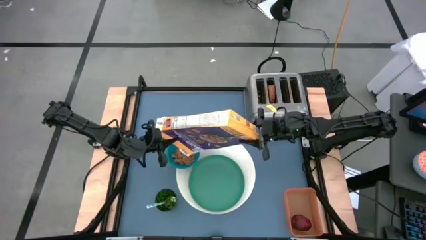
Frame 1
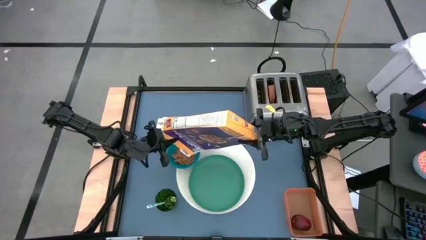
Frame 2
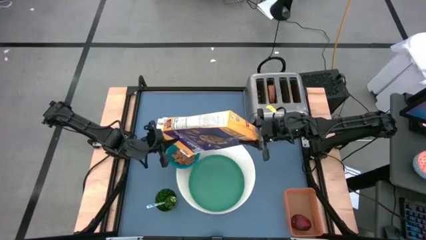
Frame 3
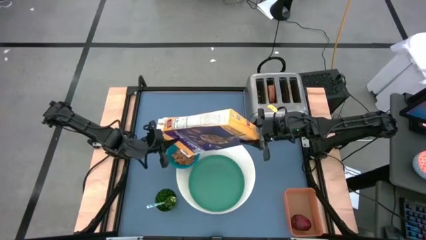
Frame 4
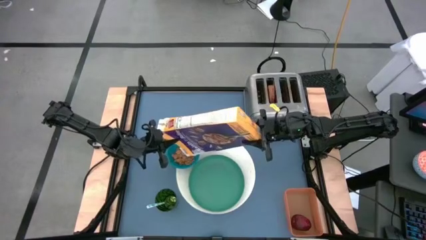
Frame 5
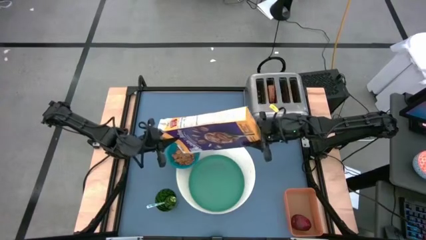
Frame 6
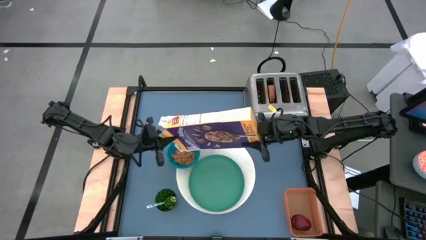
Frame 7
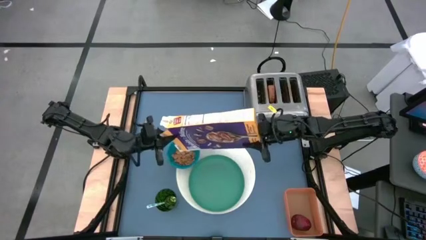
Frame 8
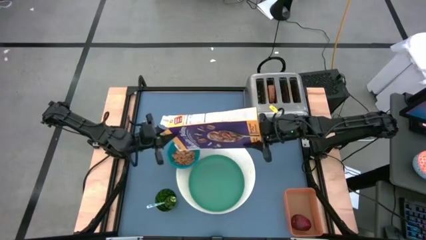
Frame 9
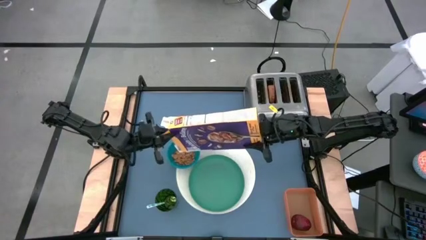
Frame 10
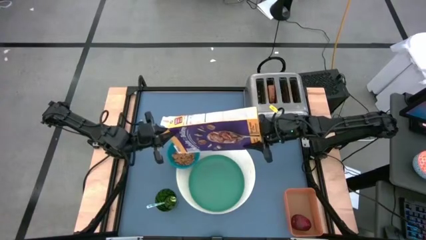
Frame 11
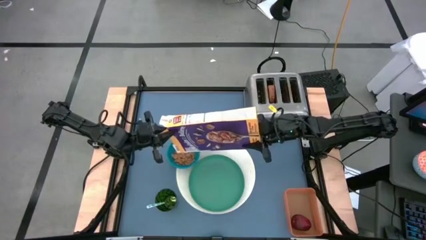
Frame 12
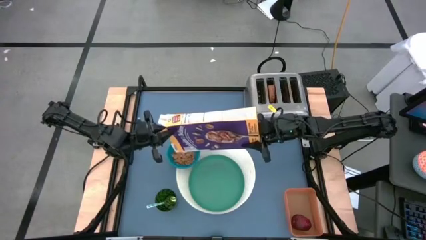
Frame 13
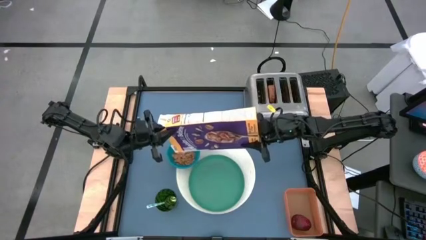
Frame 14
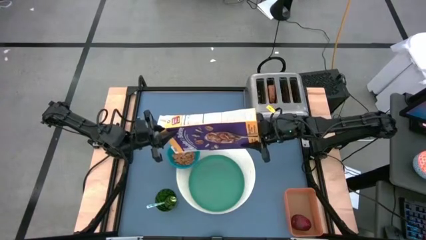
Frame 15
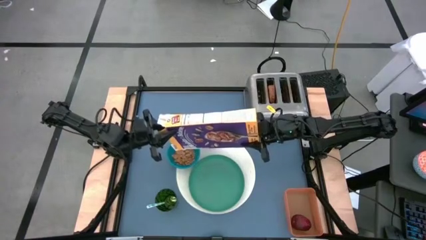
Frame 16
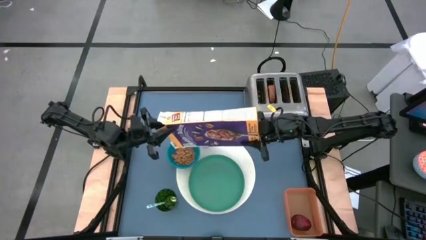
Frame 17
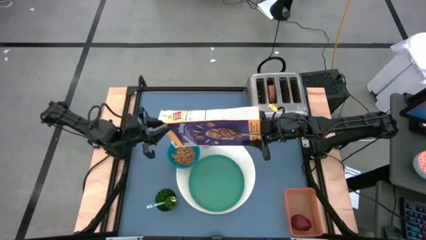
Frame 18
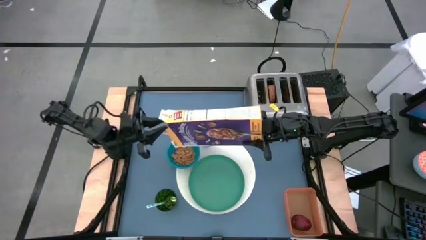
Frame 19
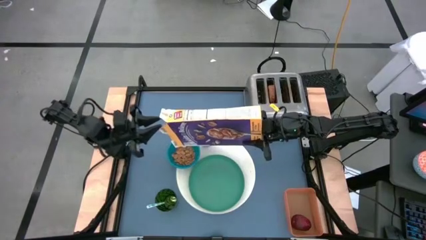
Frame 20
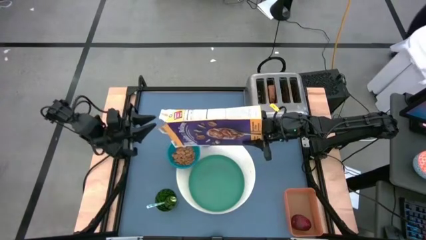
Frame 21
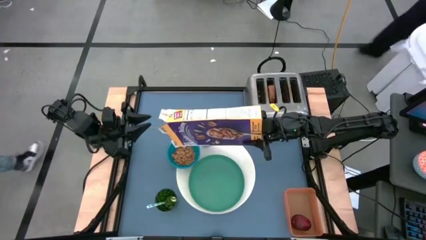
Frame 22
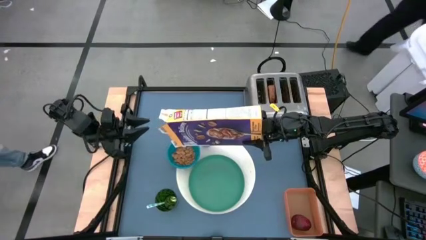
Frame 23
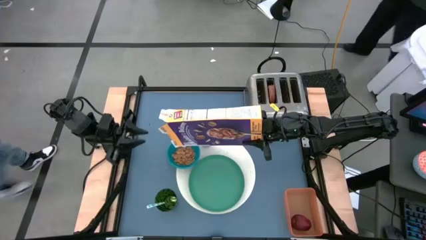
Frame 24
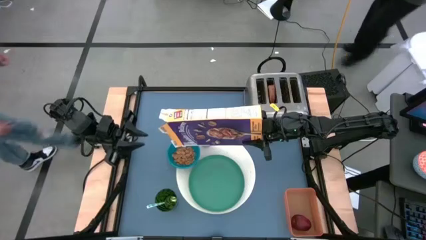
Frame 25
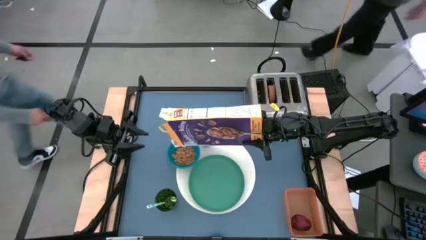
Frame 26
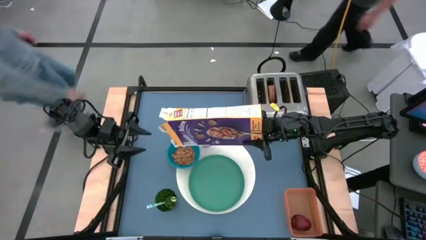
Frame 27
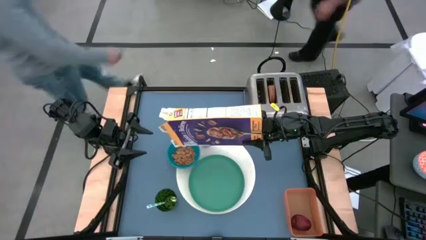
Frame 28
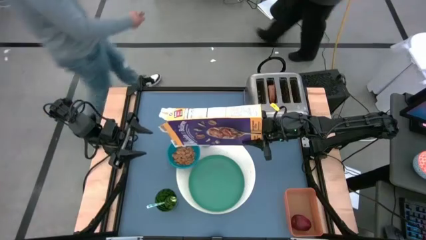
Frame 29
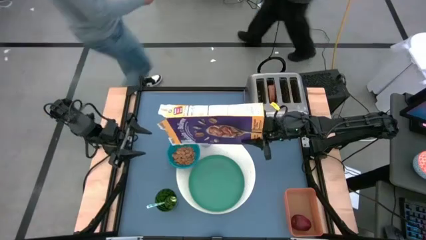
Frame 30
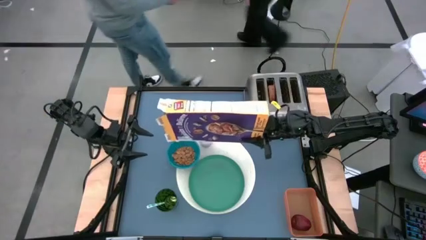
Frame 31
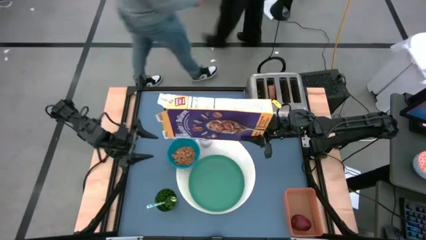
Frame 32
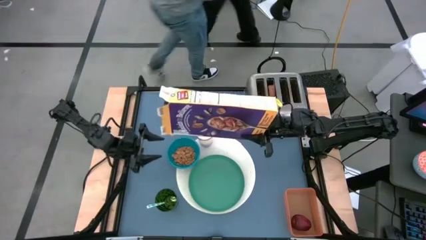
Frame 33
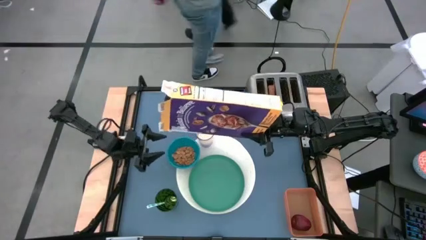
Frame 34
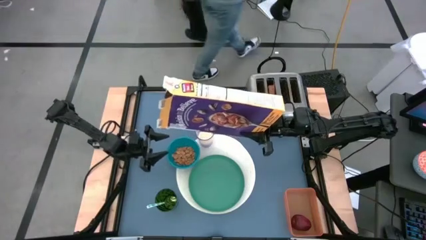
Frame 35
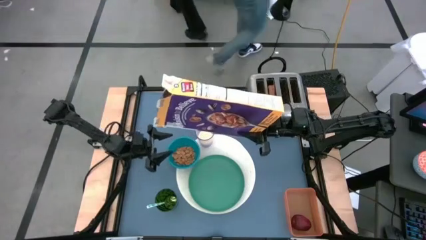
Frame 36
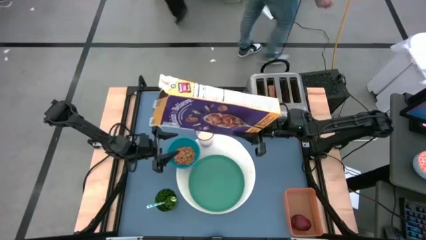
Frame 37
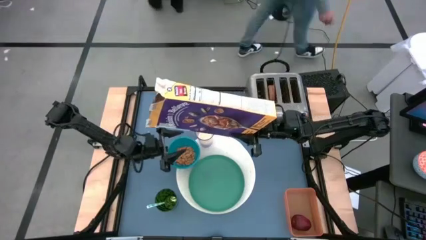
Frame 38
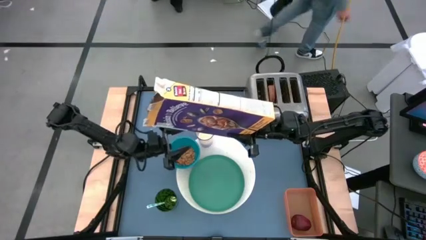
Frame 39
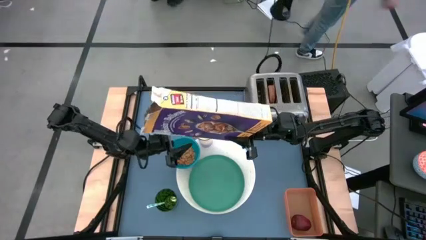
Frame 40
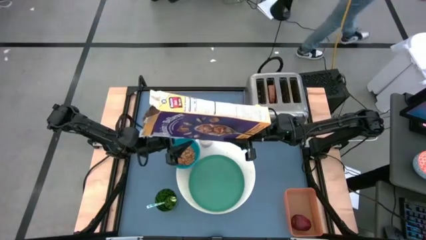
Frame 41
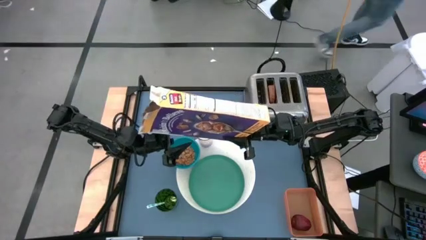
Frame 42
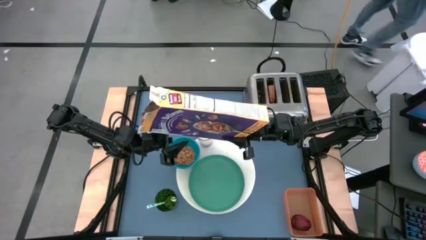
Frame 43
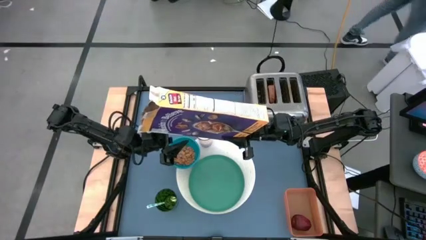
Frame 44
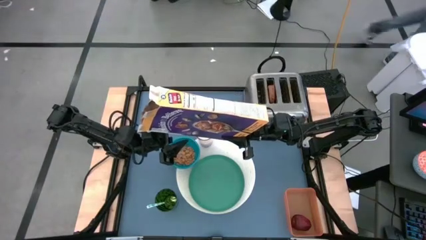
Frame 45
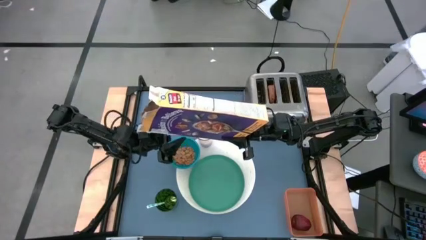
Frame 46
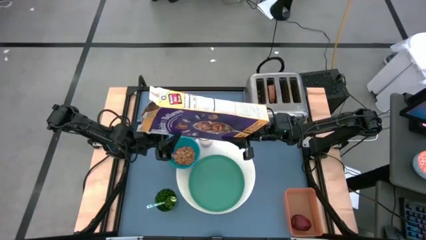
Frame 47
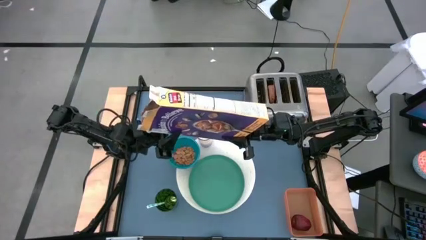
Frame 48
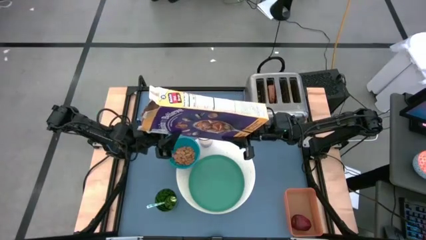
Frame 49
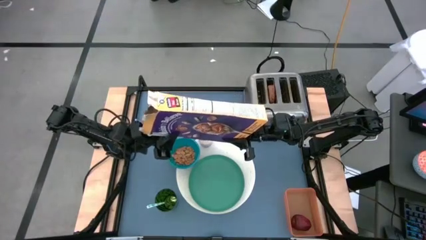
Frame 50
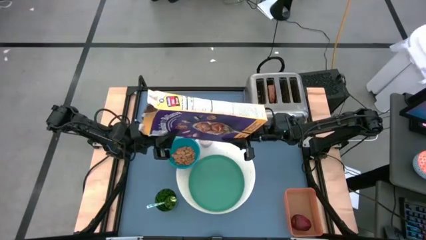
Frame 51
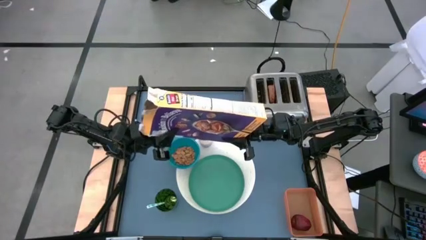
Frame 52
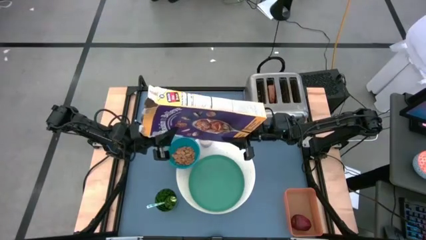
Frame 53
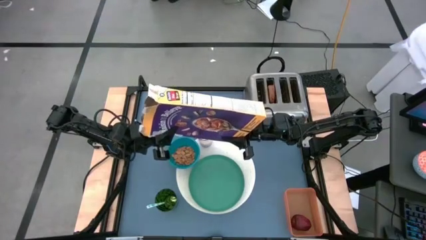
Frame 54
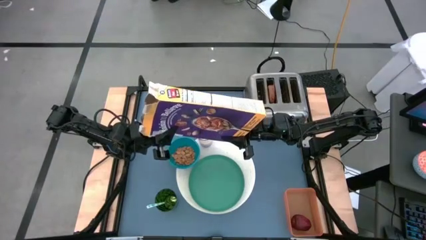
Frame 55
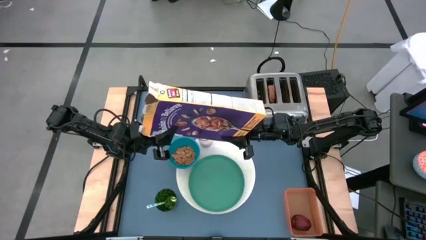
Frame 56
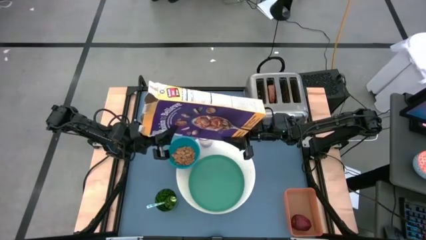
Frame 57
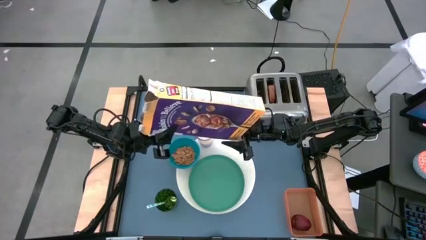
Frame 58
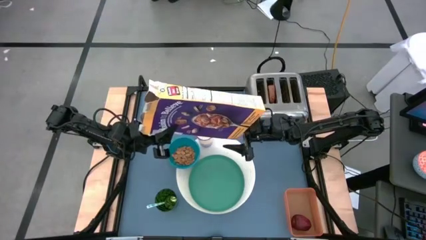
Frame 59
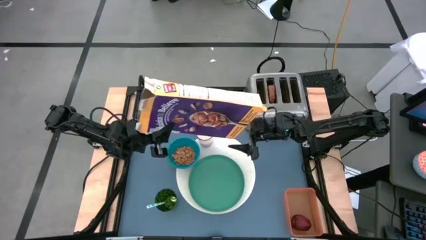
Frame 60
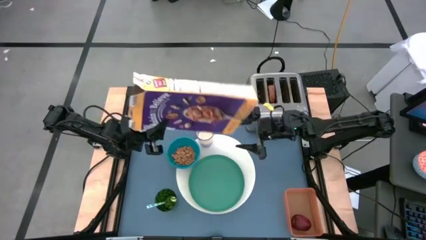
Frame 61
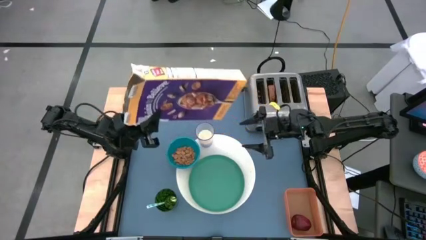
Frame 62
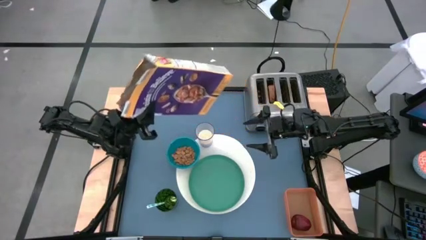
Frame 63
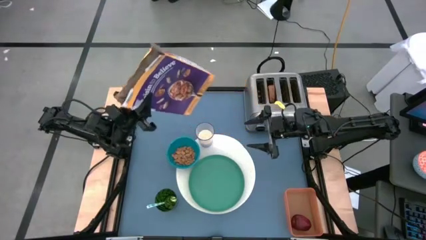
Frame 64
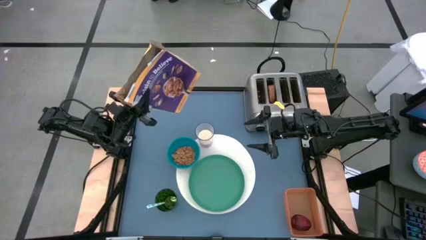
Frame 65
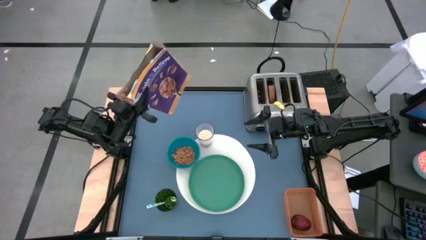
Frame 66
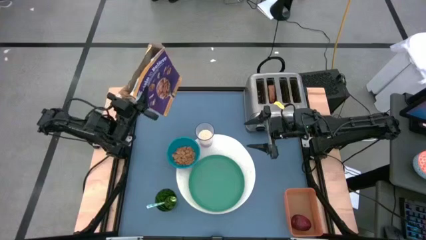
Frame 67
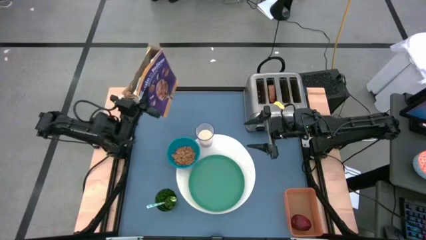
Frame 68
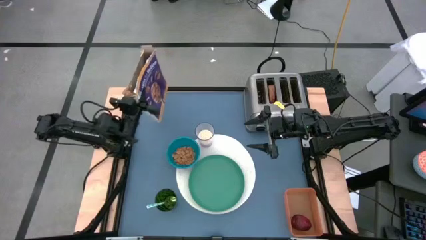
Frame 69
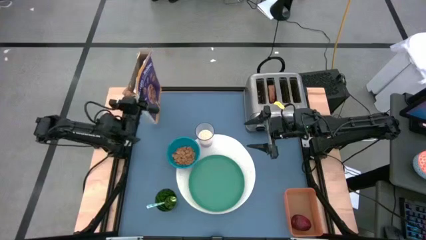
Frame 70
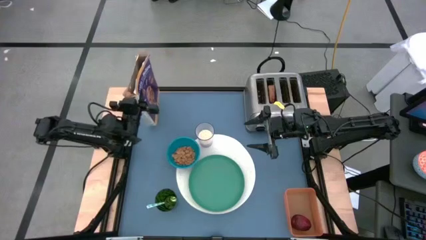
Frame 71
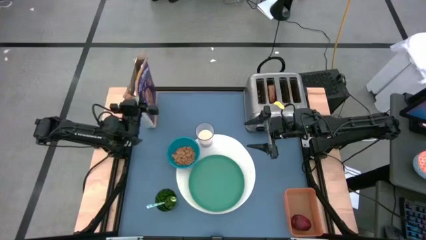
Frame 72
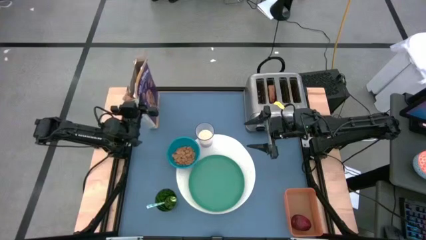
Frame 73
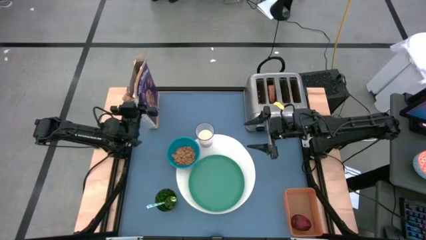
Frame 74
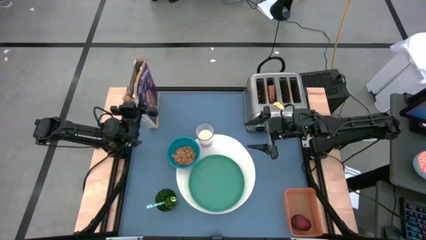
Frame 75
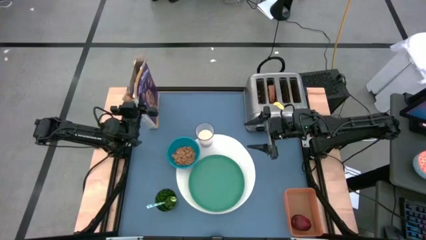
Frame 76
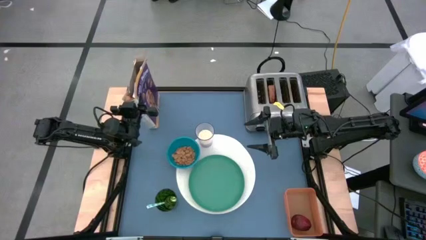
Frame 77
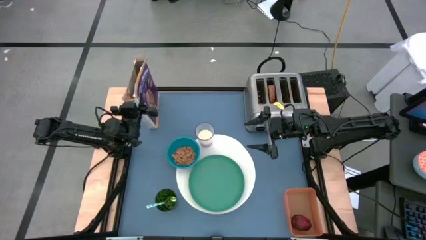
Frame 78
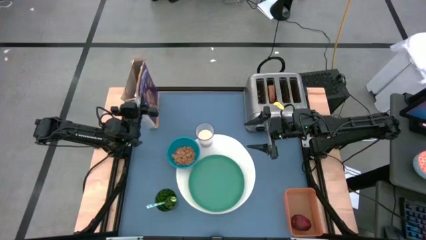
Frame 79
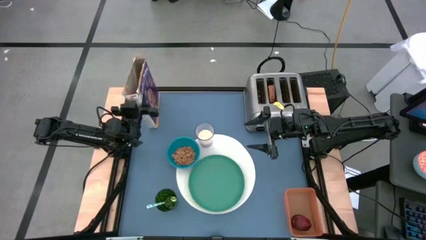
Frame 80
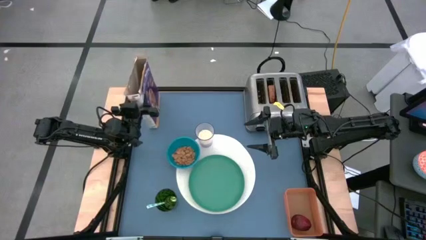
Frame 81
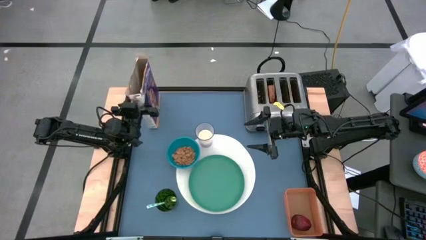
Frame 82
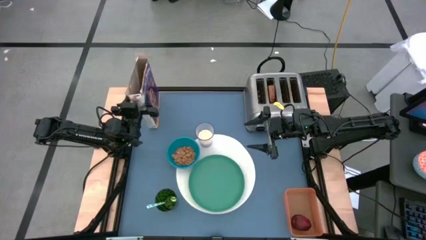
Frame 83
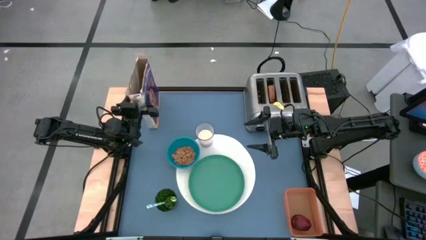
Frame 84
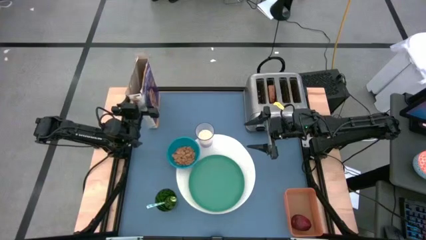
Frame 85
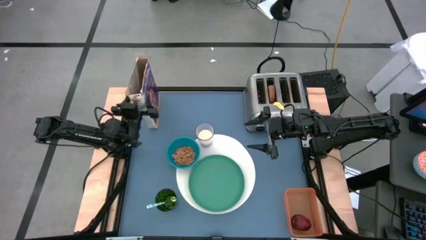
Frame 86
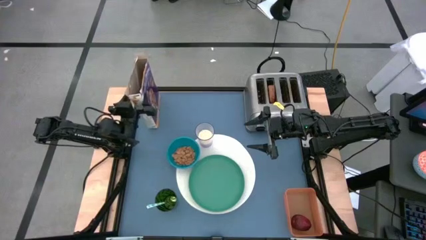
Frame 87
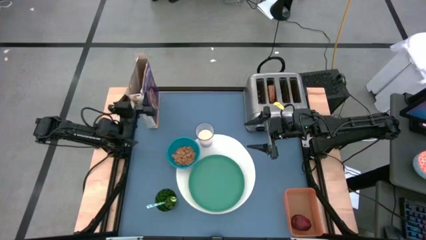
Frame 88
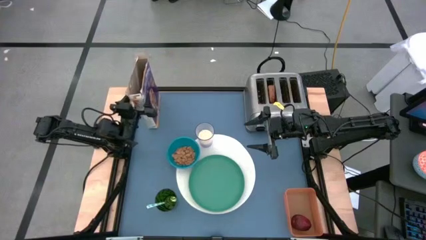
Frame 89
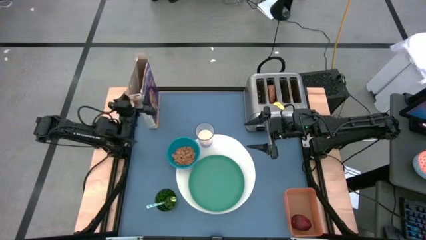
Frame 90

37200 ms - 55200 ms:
Task: Arrange a breakfast setting
Pour the cereal into the blue bowl
